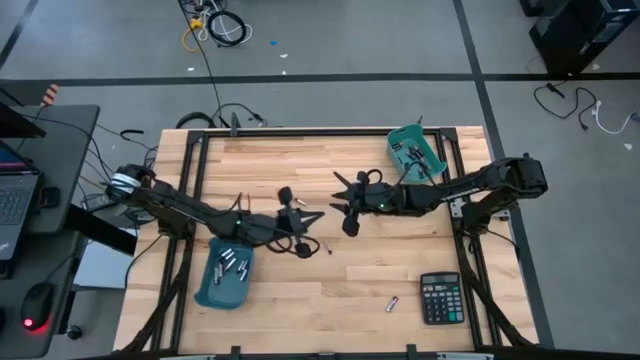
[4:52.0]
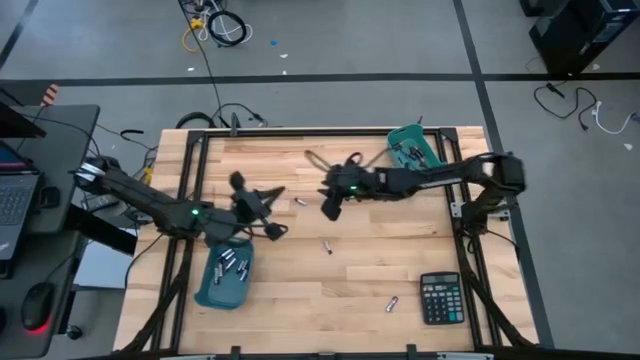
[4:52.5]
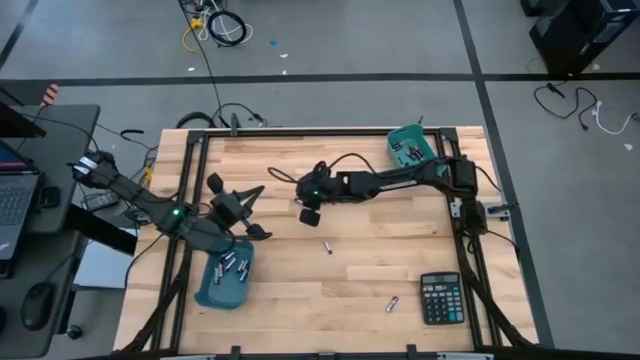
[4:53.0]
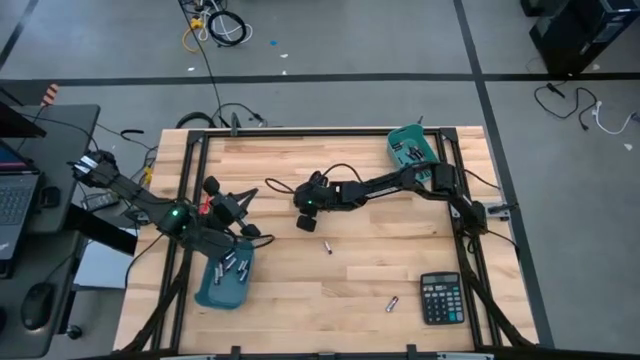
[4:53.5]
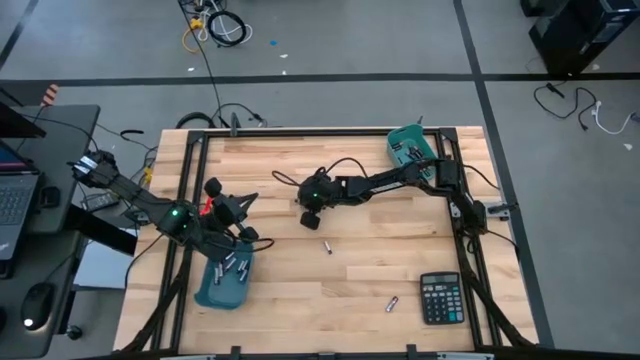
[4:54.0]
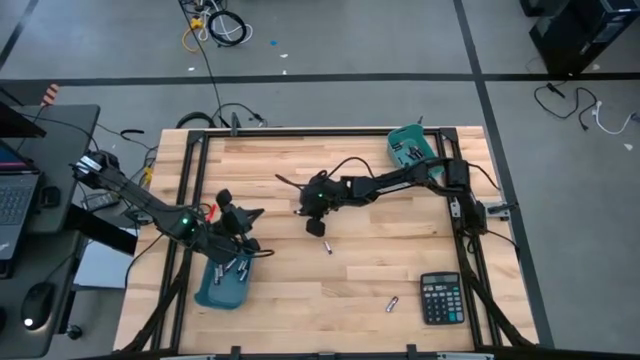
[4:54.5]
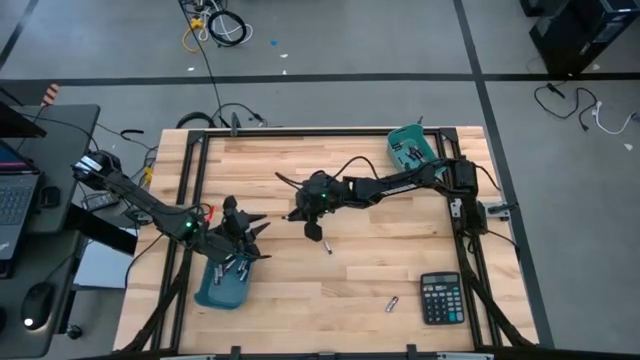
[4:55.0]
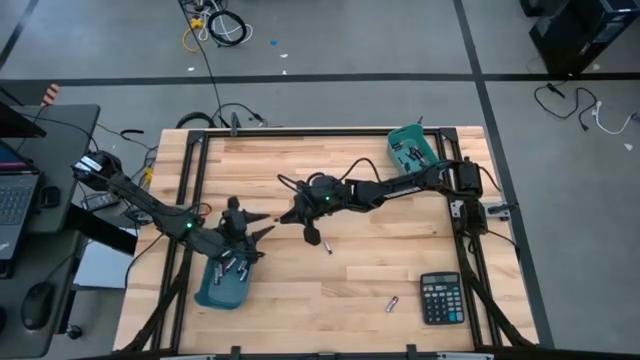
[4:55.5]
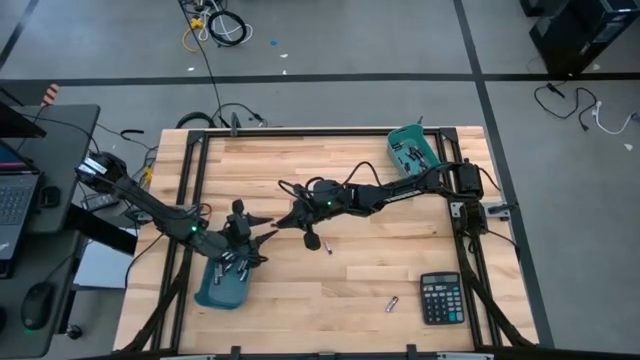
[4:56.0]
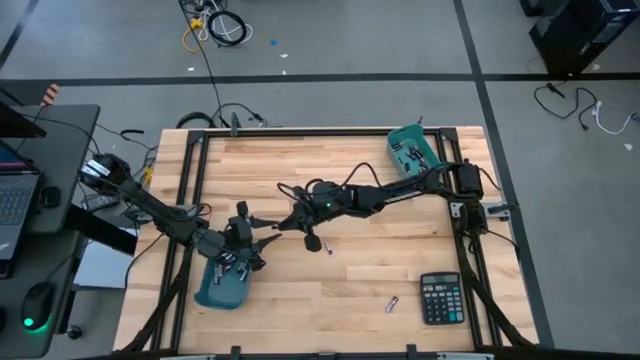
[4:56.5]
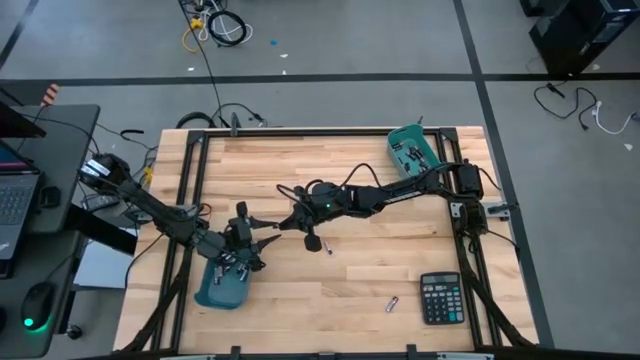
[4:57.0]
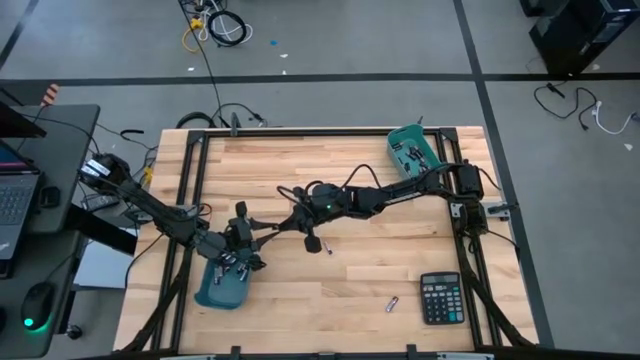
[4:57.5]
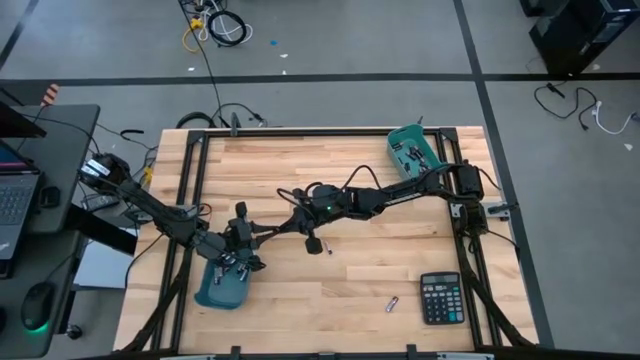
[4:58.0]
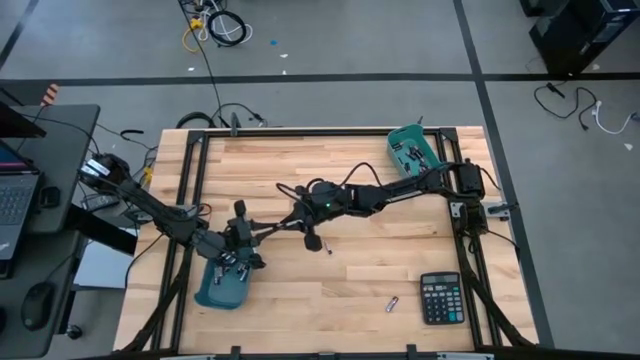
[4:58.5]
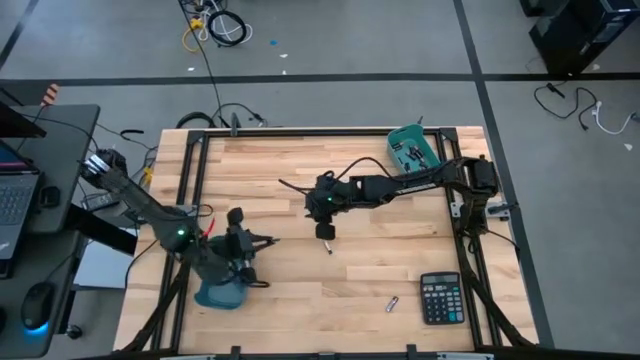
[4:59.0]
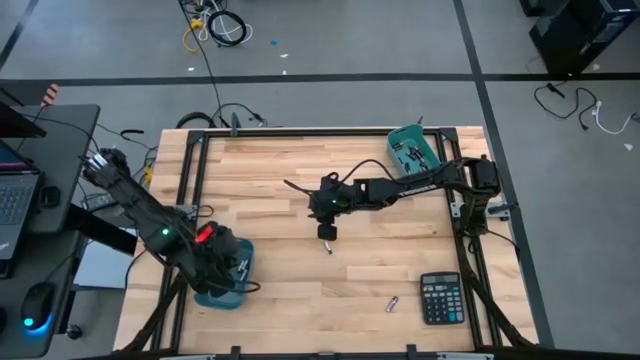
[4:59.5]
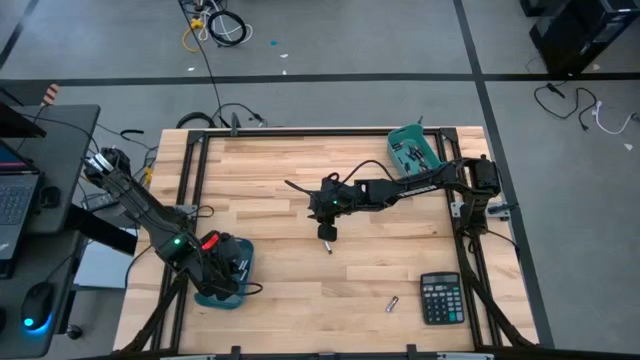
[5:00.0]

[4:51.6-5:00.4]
Task: Sort batteries
Put the silver battery into the blue bin

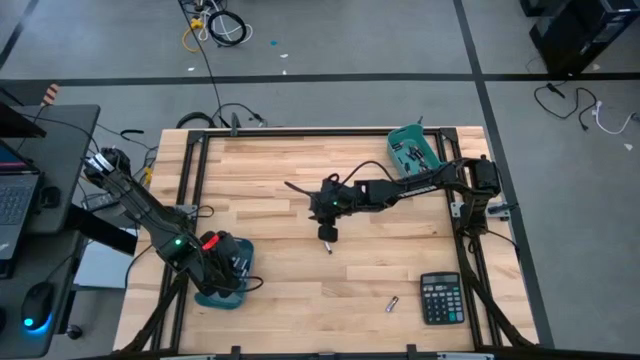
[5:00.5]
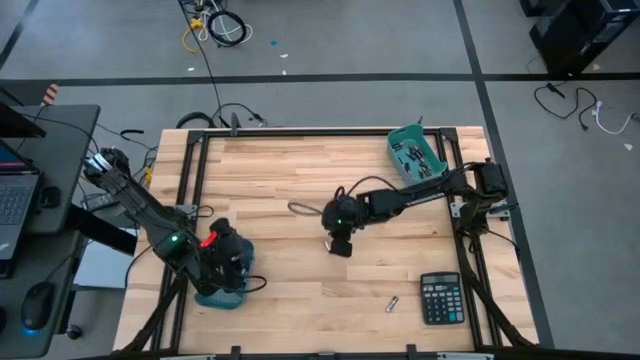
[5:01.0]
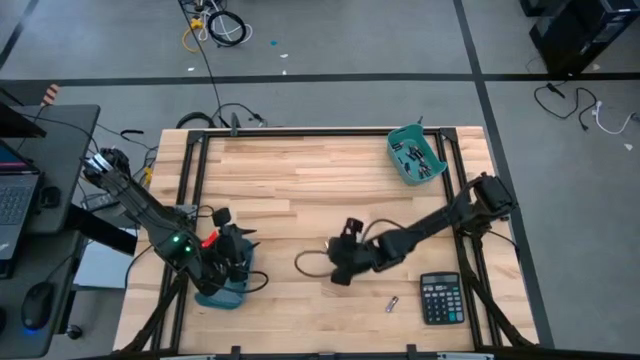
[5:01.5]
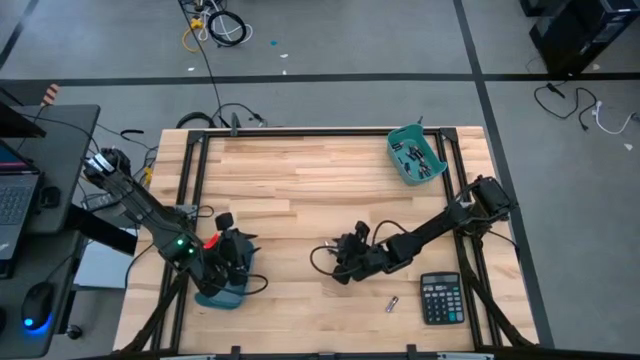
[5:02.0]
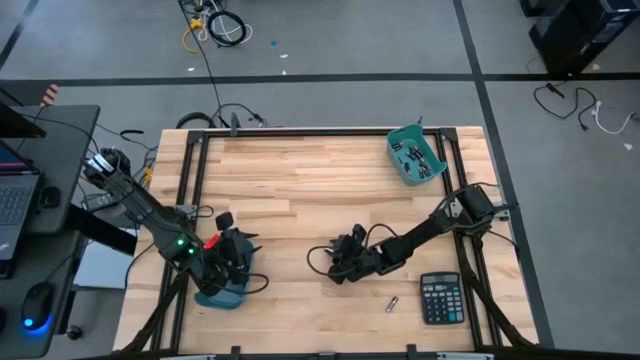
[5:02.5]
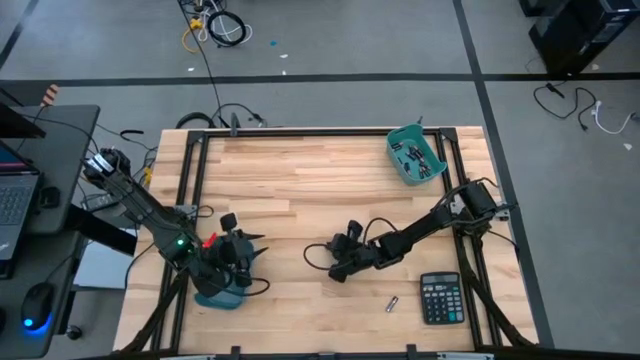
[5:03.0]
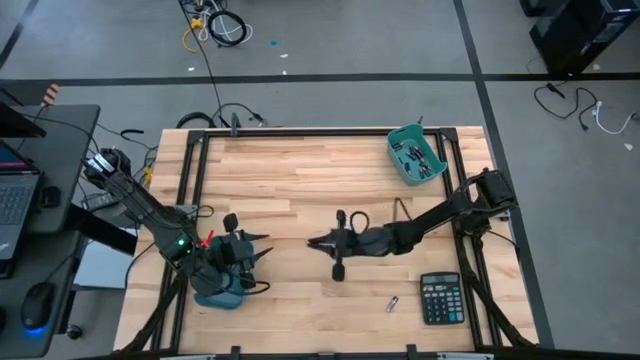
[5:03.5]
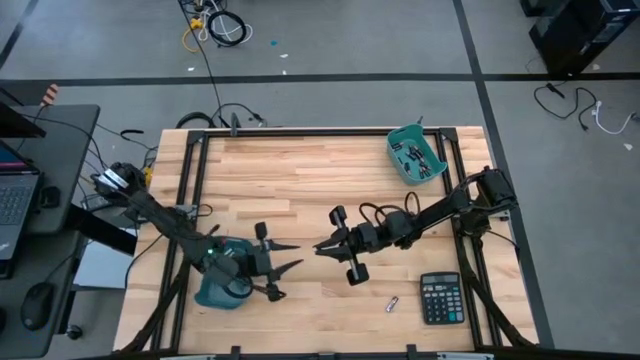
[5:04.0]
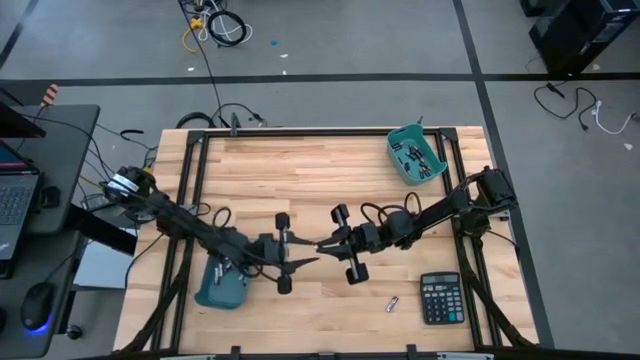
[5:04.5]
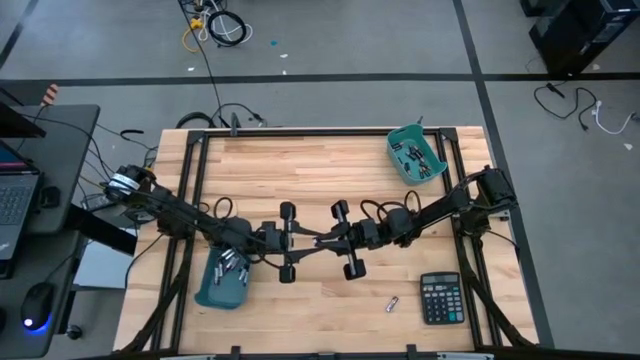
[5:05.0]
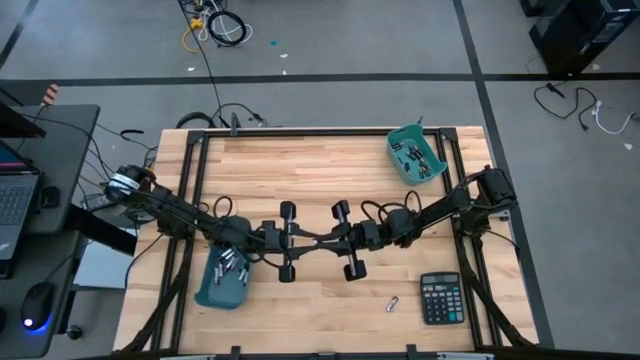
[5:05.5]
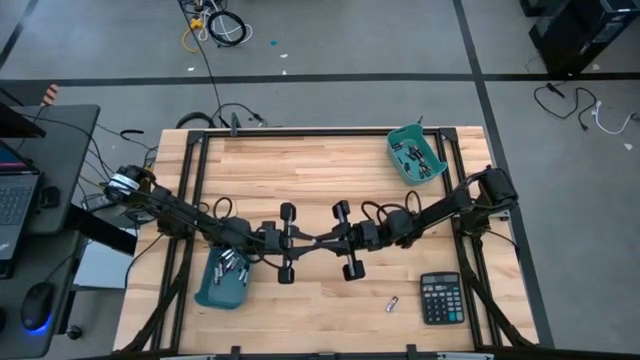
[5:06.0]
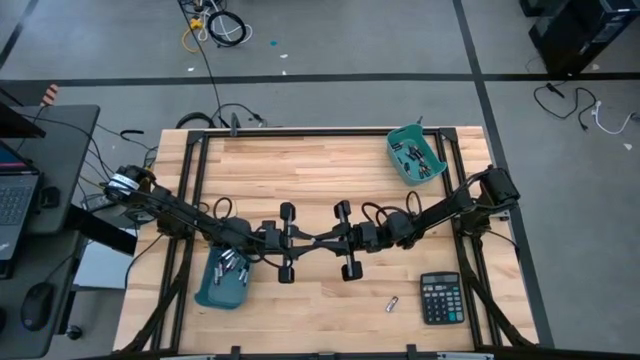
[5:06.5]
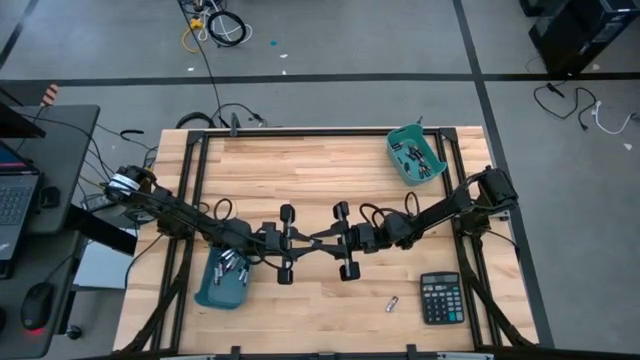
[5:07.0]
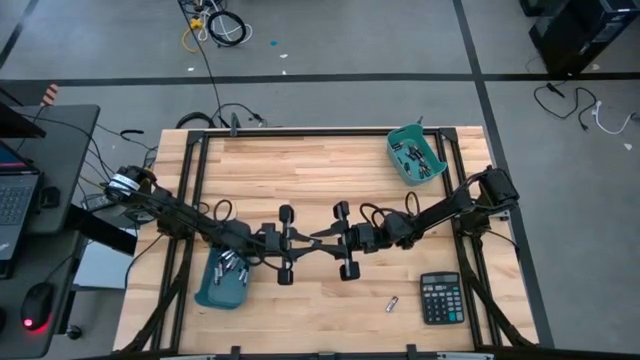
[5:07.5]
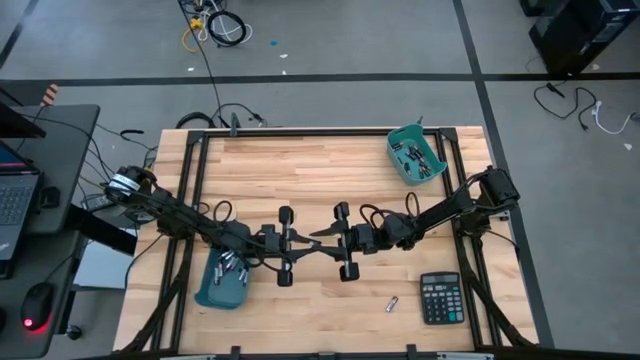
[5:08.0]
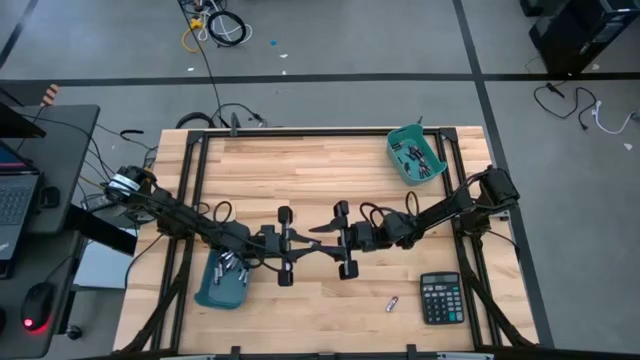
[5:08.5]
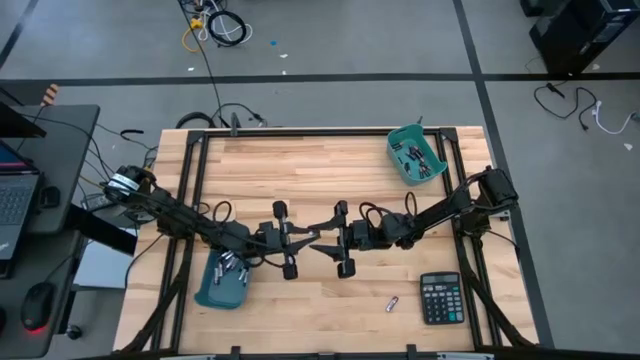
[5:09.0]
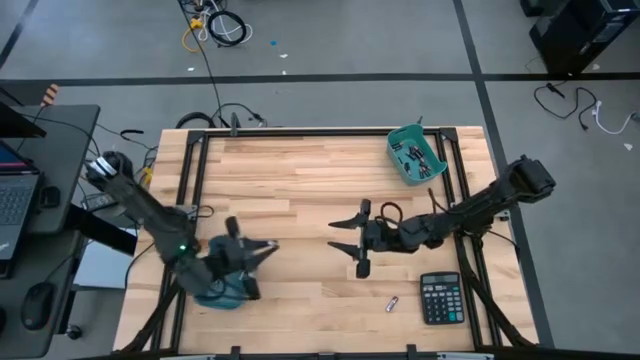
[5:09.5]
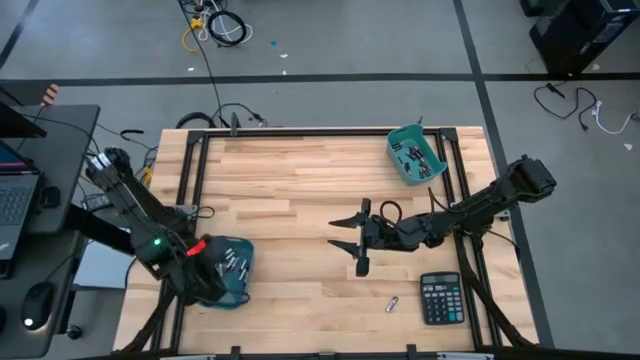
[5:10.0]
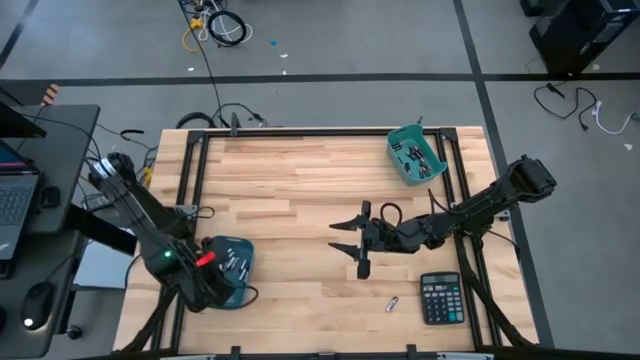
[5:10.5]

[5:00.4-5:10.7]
Put the silver battery into the blue bin

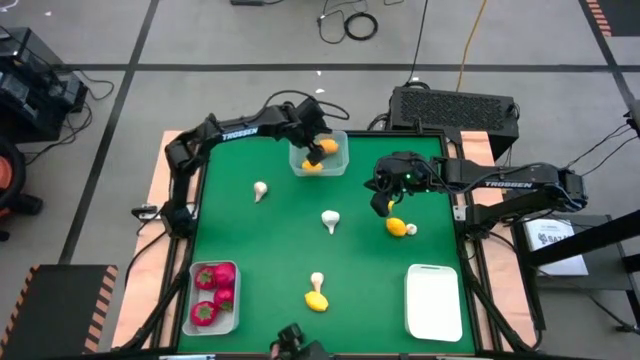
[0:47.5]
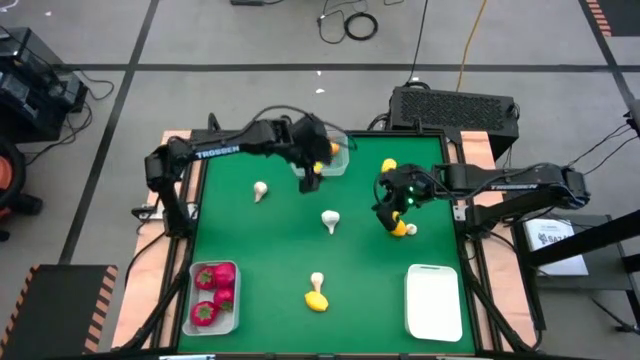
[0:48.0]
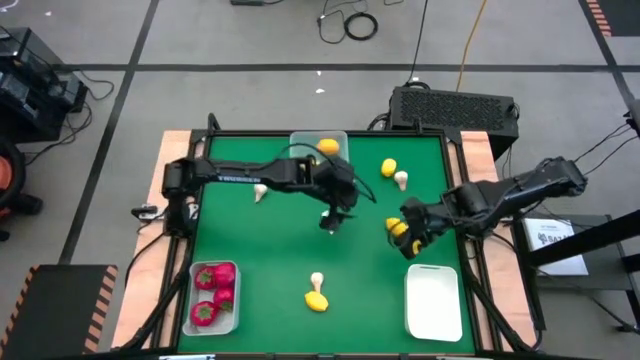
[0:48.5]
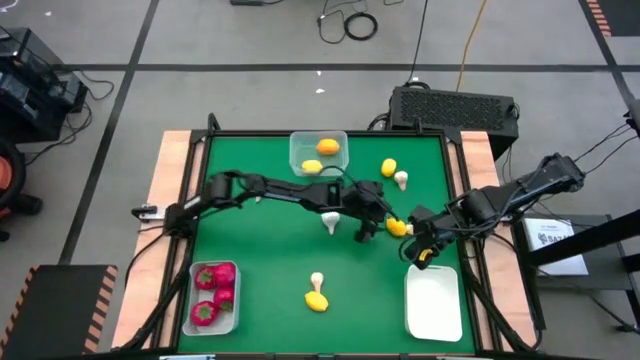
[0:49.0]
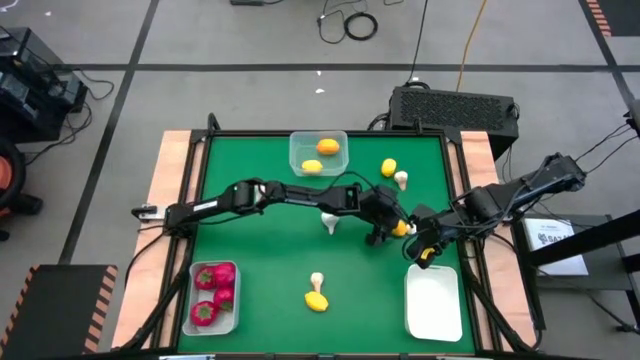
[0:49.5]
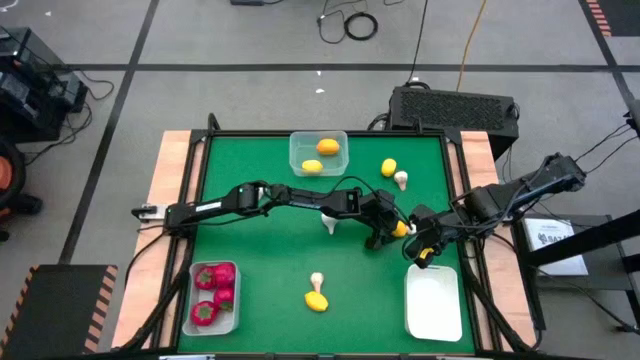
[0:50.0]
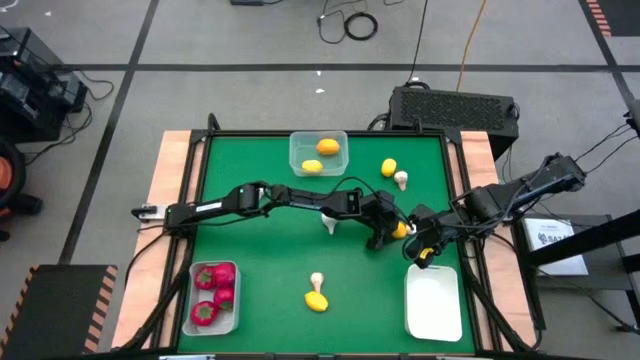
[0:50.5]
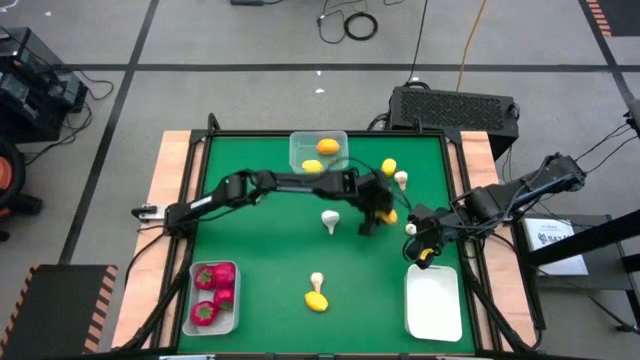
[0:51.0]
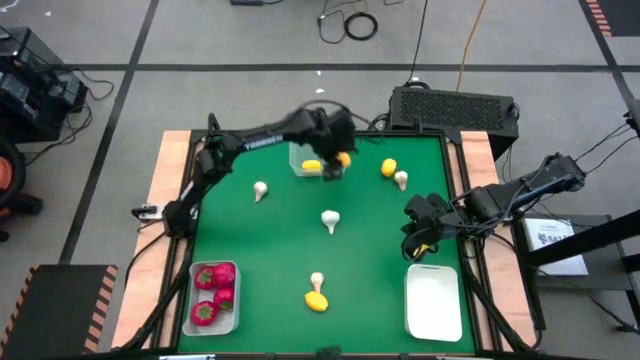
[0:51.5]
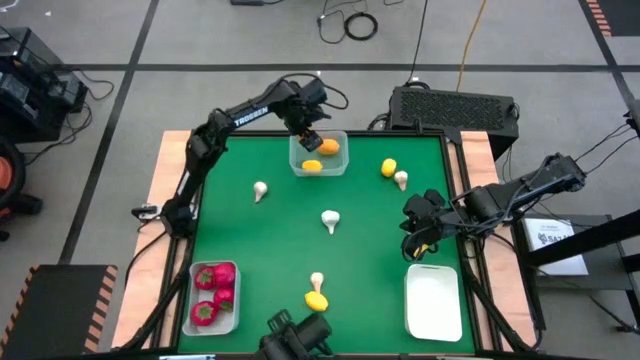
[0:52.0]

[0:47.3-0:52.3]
Task: Sort produce into baskets
Put the lemon into the transparent bin
